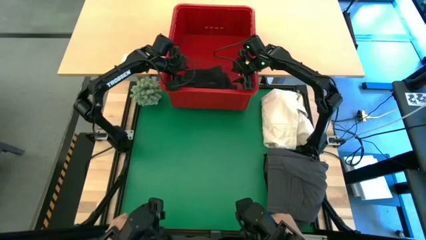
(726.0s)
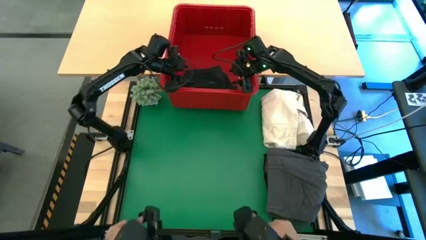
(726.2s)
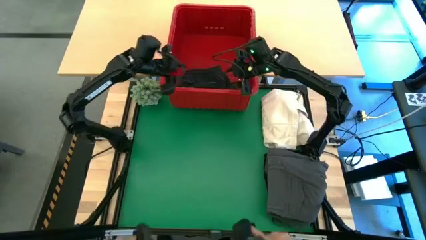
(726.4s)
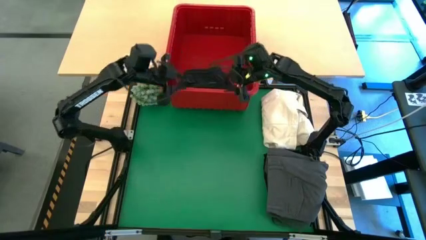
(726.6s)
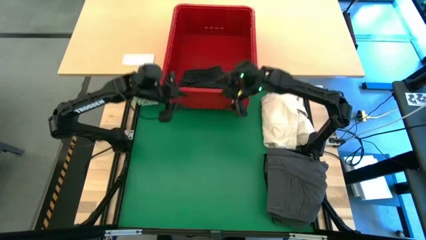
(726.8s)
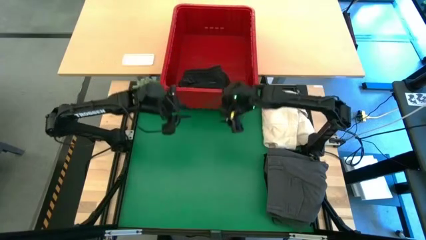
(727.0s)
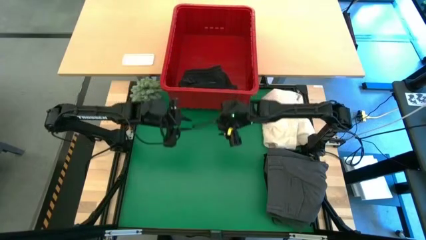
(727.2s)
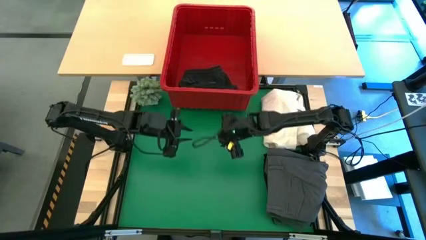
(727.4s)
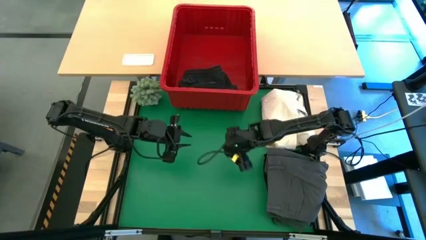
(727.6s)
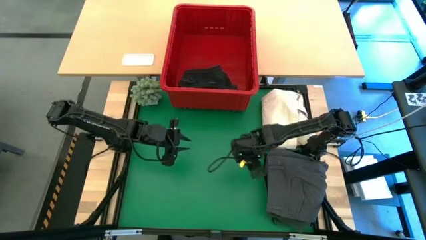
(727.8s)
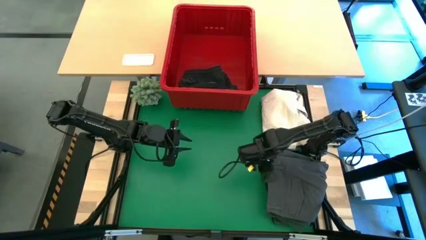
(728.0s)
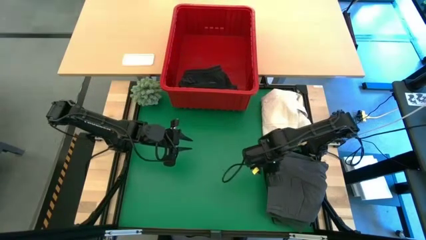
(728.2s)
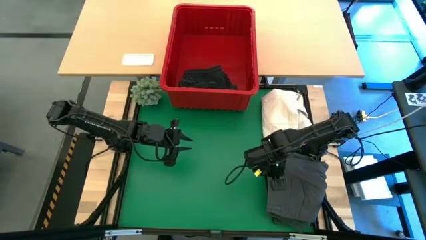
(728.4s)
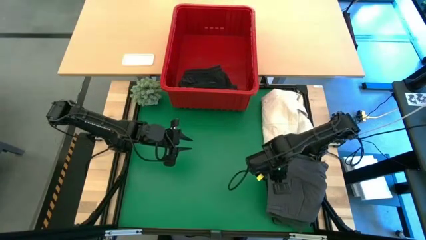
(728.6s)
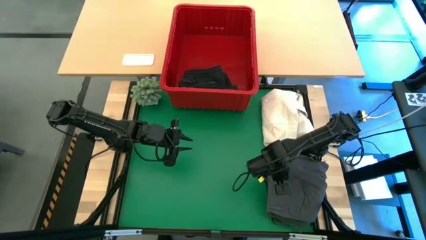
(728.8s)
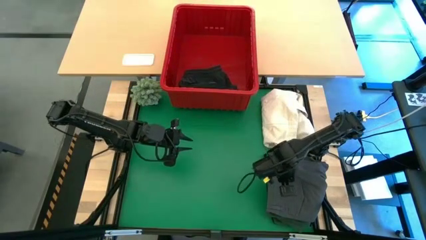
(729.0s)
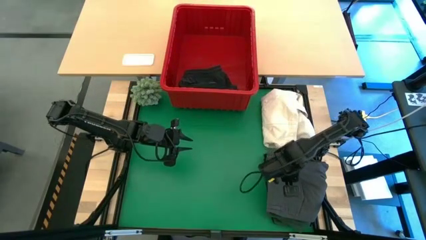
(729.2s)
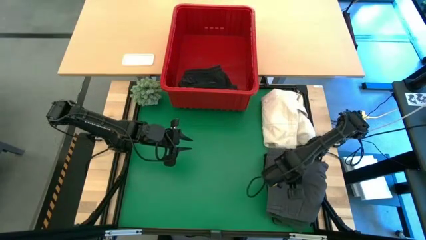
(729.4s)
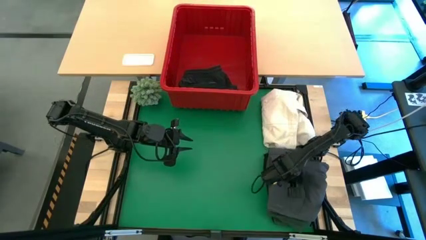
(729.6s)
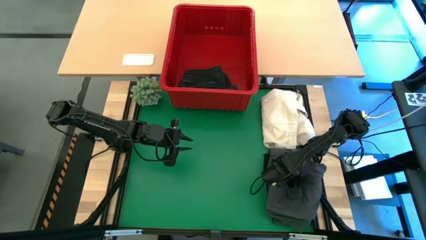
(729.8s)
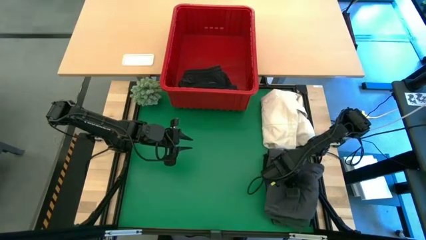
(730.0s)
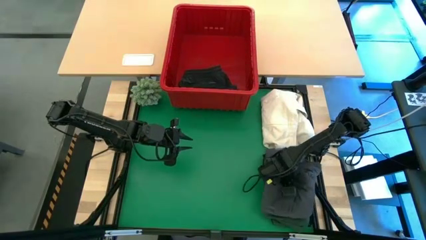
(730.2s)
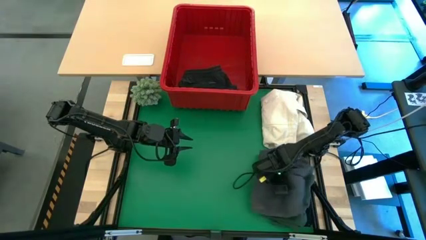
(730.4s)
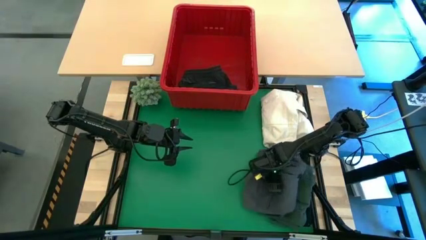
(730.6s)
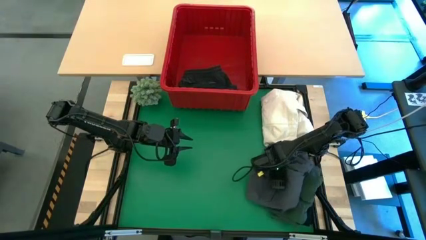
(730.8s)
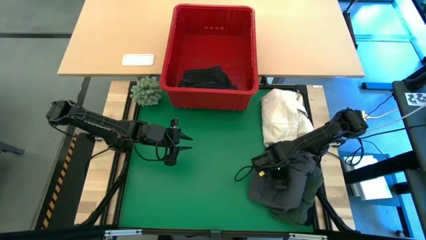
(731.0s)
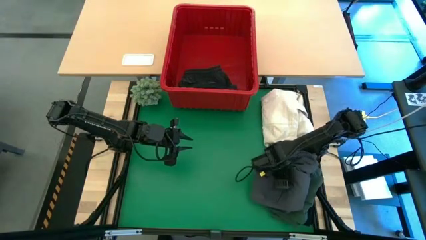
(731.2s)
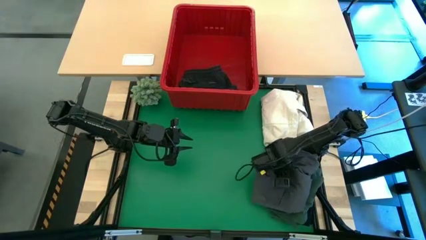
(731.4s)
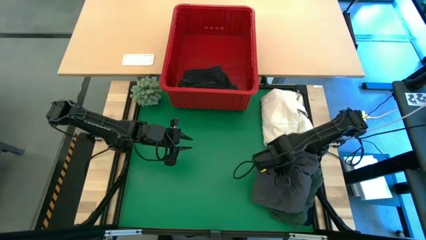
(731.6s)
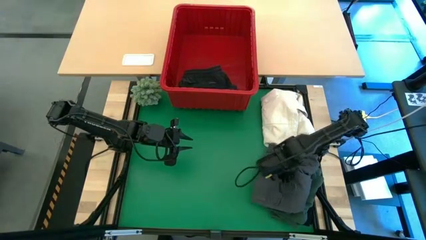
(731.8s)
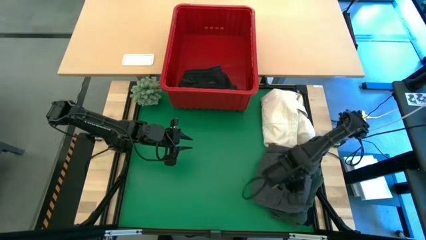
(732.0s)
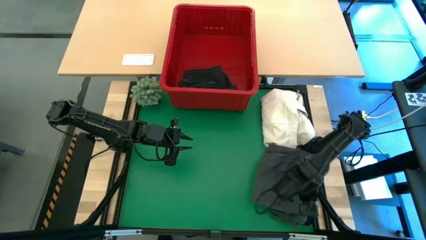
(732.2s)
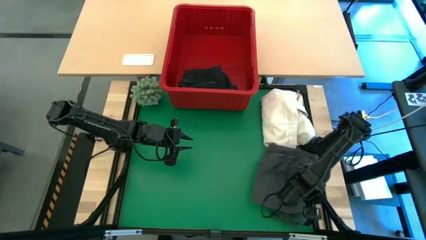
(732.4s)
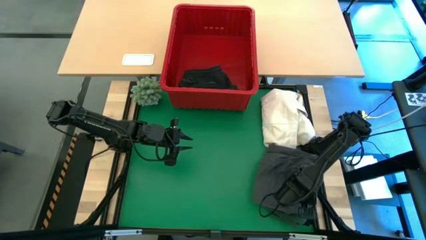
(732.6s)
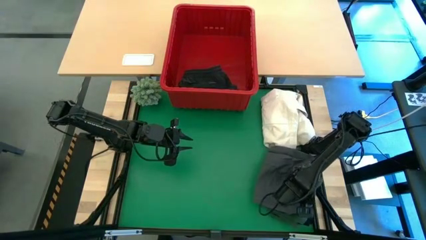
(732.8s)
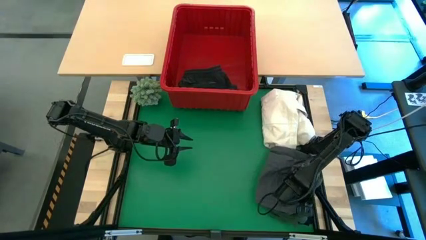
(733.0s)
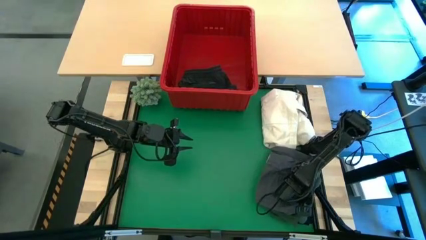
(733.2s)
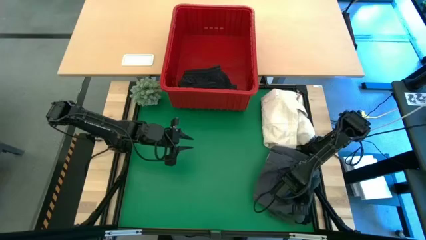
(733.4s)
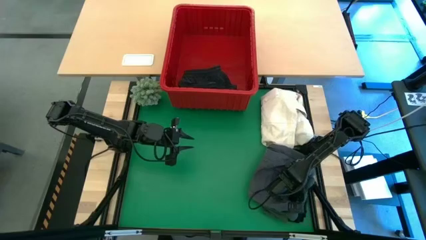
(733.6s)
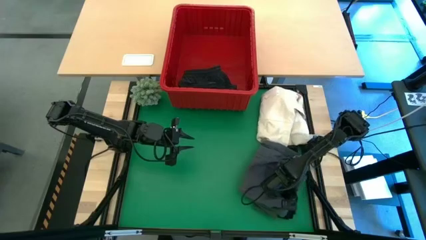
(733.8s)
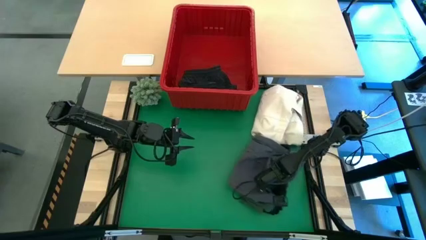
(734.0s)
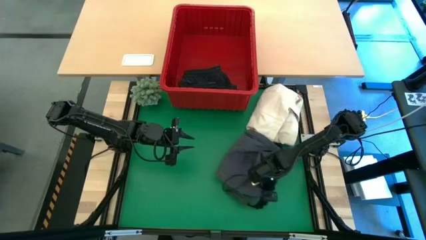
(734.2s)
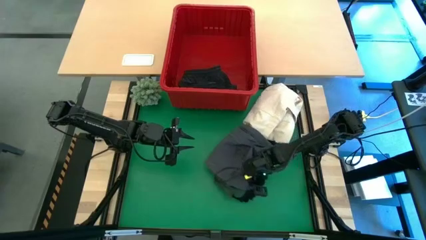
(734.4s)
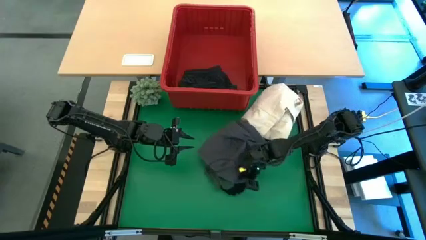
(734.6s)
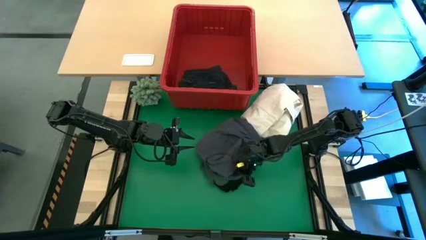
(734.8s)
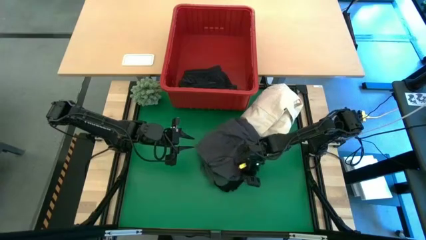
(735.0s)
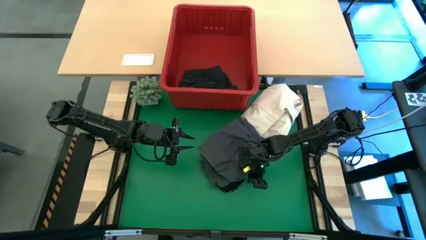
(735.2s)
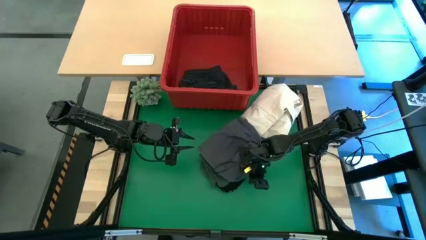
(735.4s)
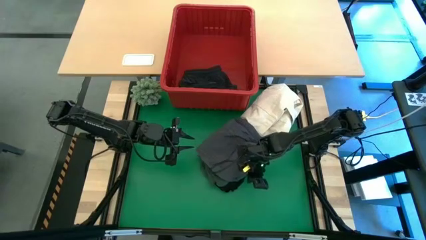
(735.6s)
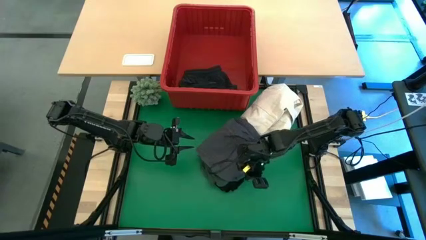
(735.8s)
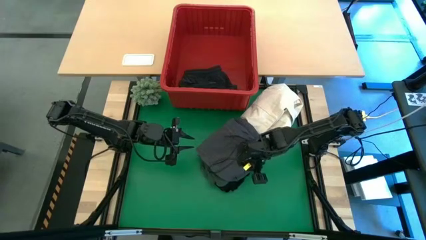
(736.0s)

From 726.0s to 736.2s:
Task: Fold laundry
Put the gray folded pants into the red bin

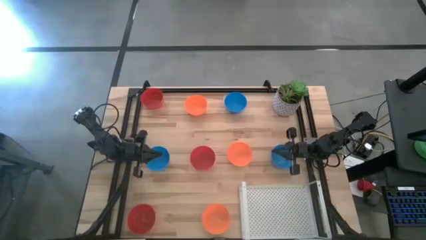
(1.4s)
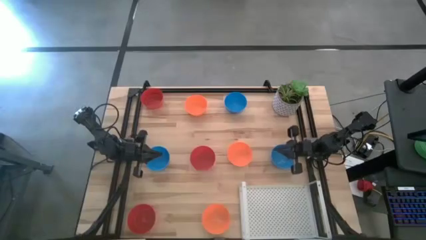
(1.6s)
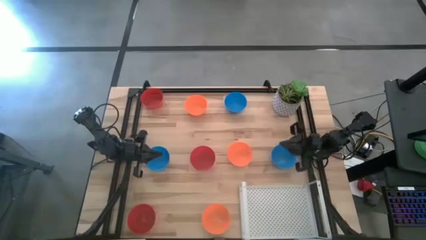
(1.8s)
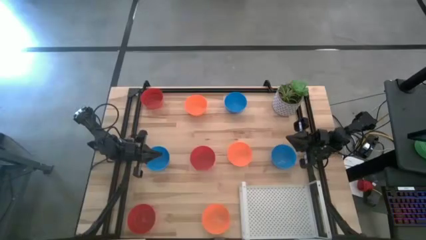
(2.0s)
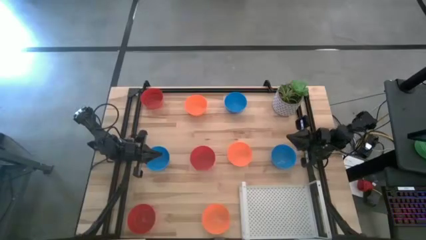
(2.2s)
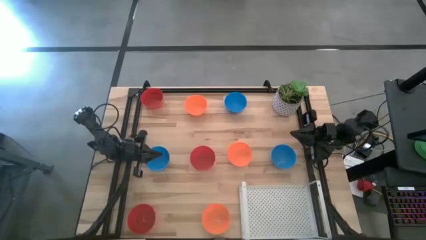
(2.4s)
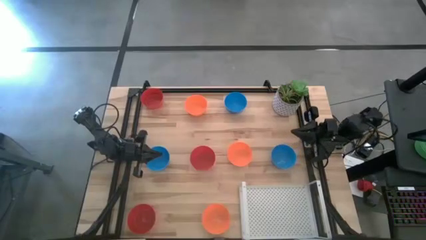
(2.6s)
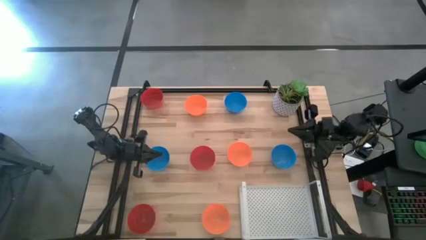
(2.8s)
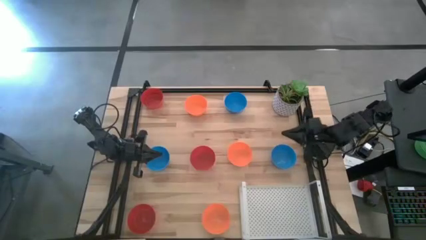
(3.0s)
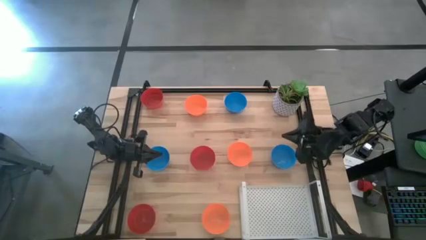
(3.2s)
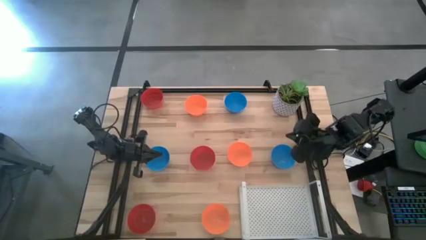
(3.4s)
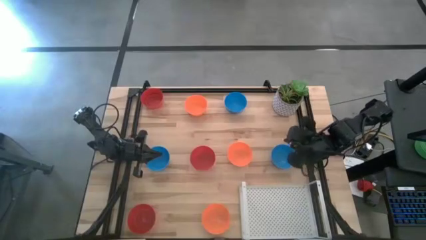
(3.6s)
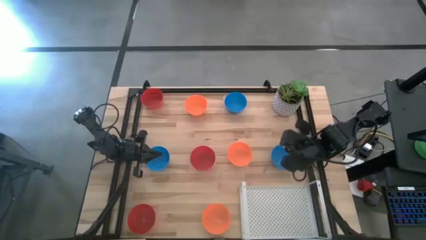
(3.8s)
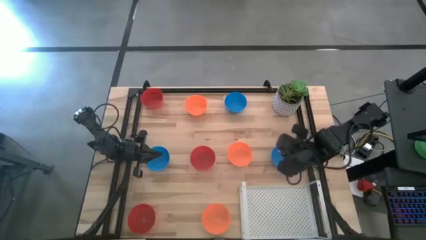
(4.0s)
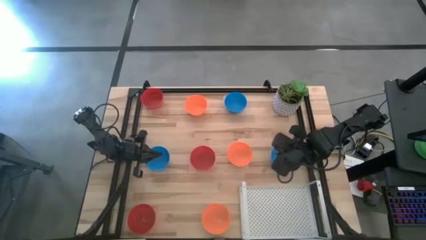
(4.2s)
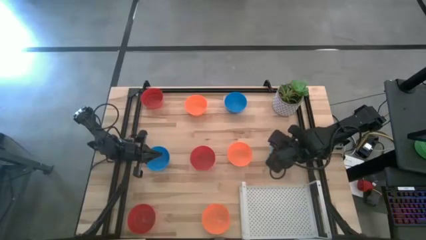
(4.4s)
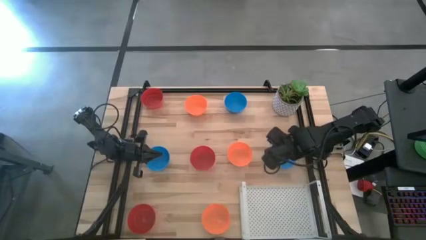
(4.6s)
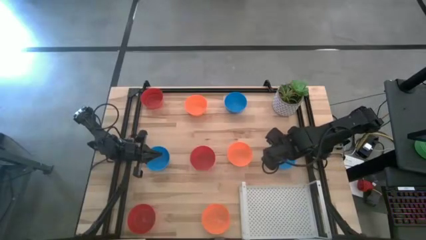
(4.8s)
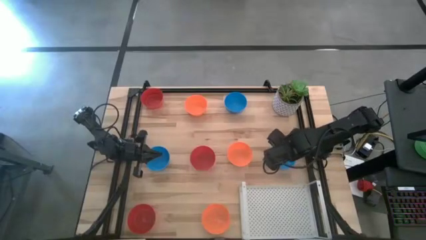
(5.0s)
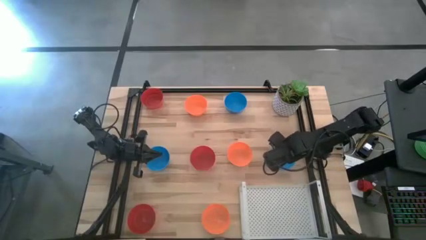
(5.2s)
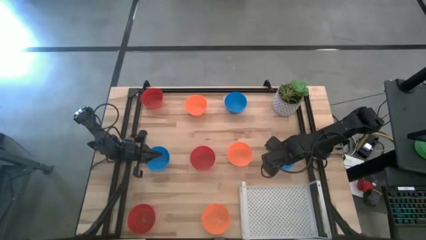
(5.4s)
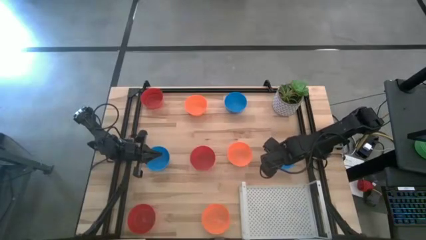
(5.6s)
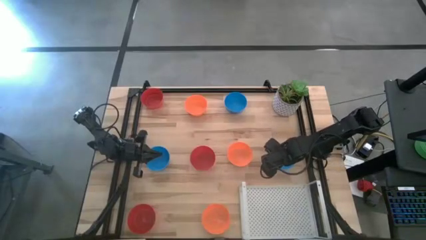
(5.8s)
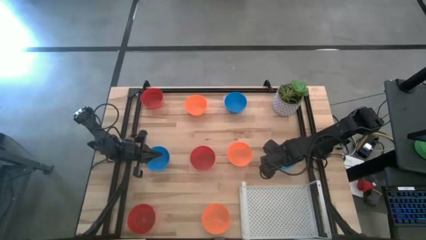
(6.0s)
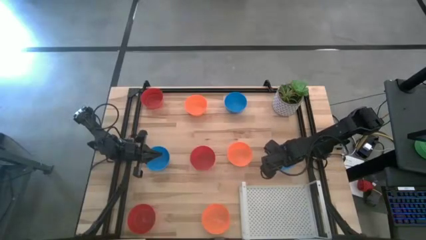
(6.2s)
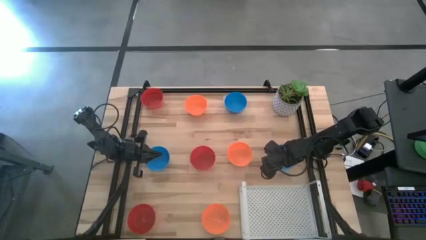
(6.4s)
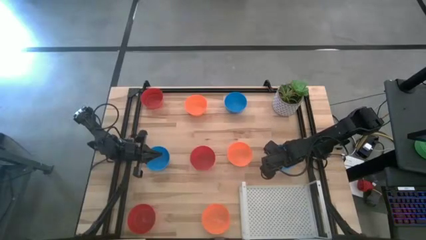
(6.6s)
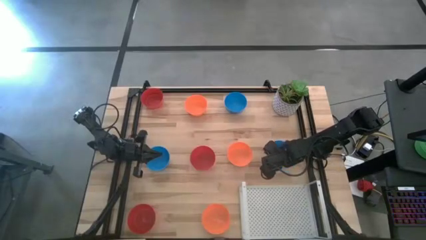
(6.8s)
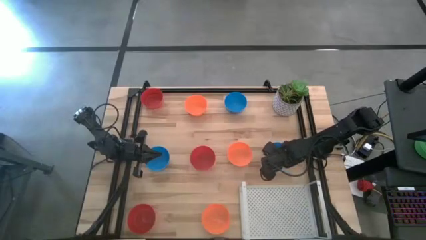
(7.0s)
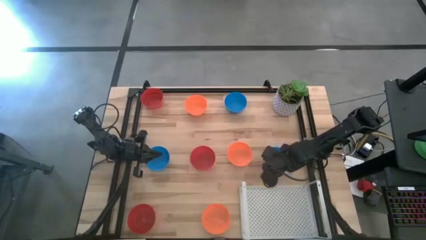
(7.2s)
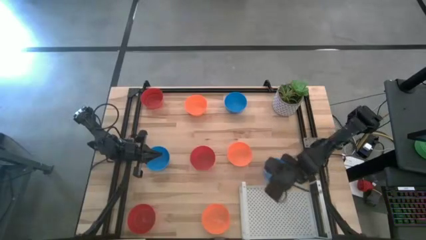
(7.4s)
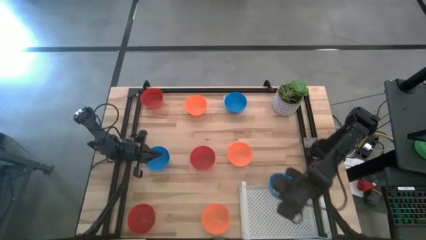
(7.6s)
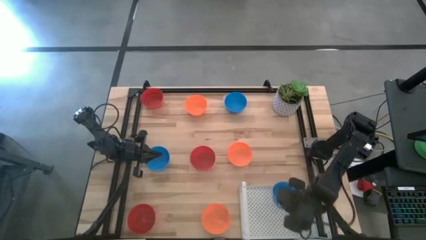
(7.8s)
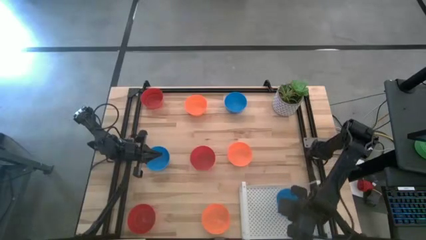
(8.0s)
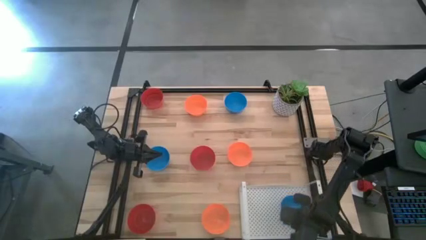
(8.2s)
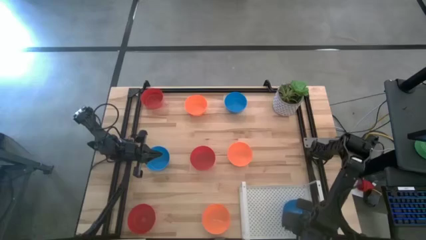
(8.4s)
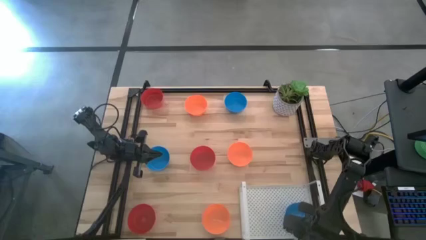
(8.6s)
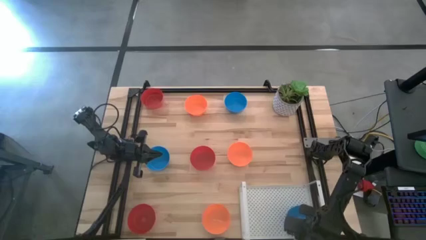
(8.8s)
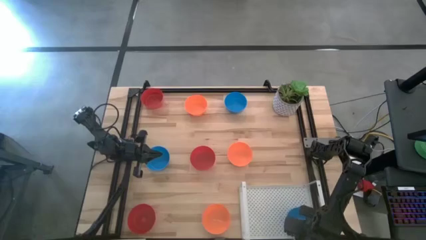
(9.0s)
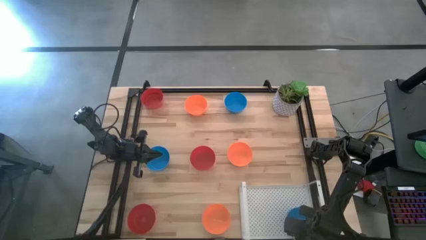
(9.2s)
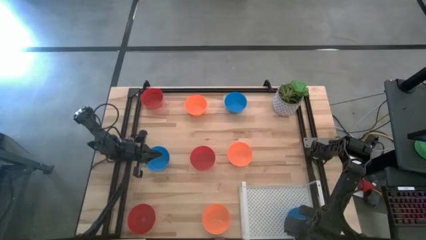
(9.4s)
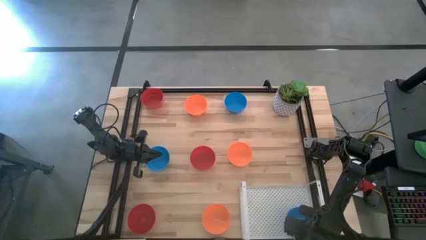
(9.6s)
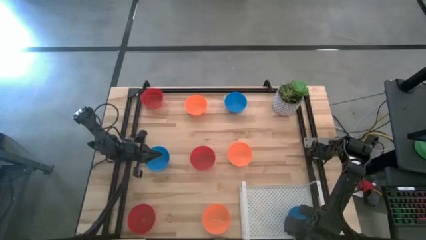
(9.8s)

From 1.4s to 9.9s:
Task: Pick & Place Mini bowls
Put the bottom right blue bowl on the shelf
